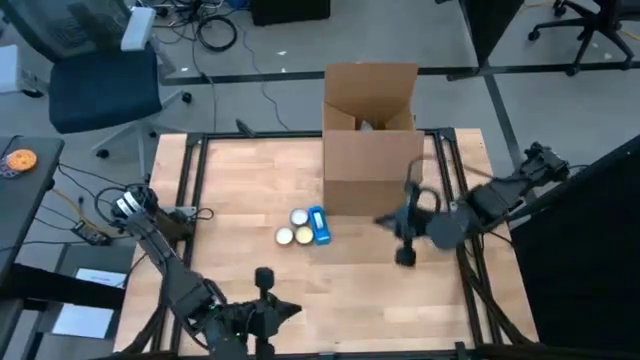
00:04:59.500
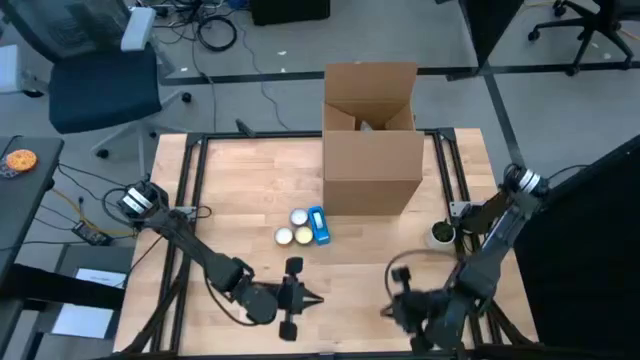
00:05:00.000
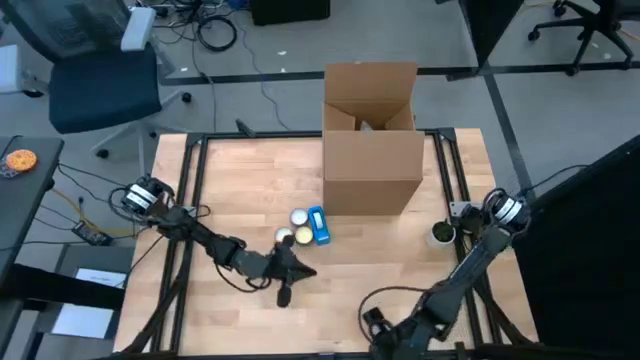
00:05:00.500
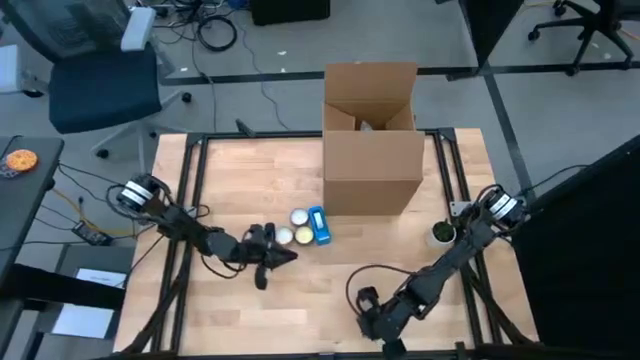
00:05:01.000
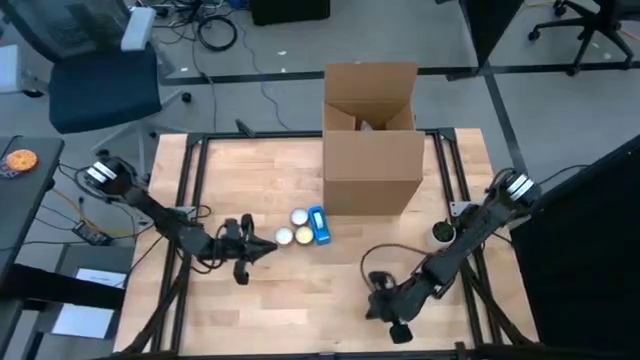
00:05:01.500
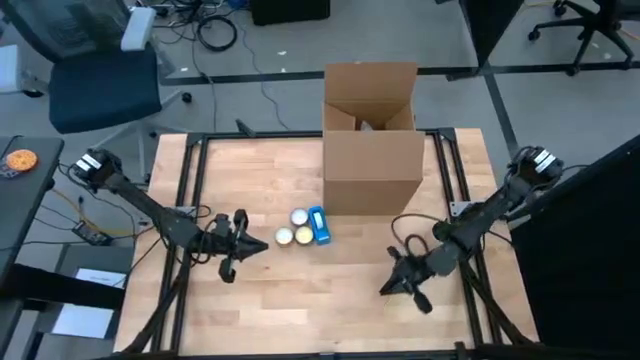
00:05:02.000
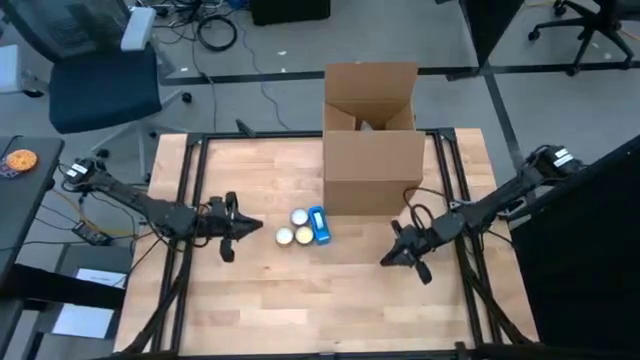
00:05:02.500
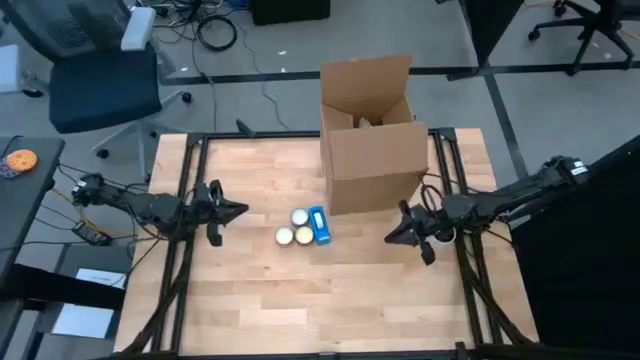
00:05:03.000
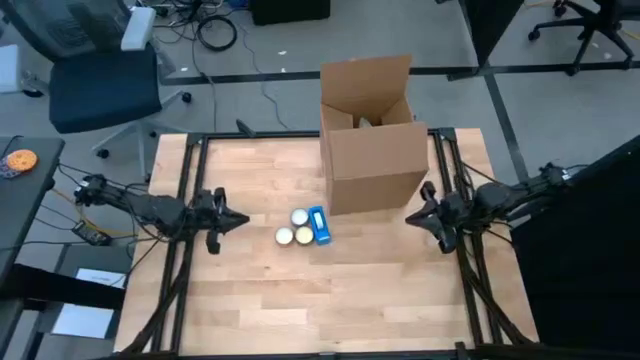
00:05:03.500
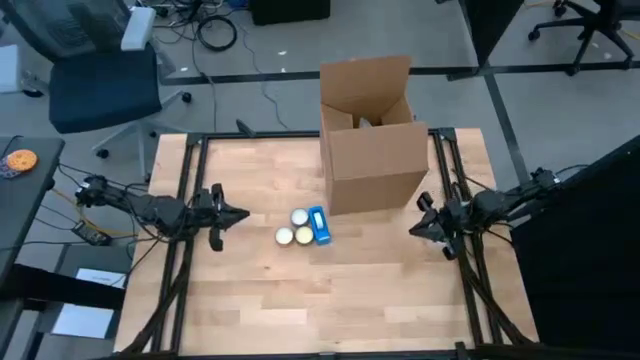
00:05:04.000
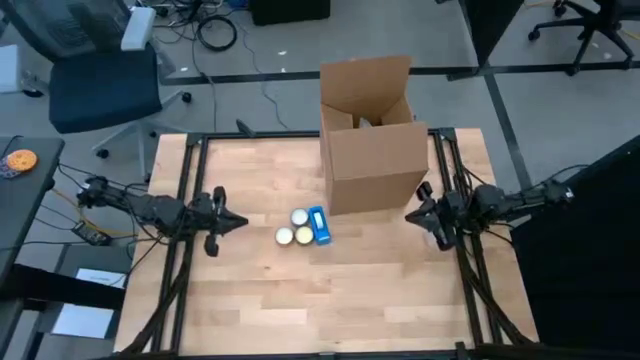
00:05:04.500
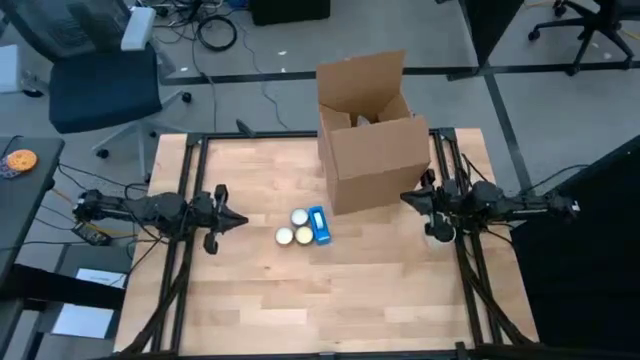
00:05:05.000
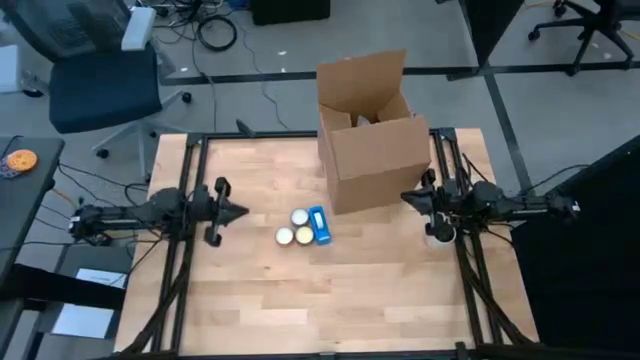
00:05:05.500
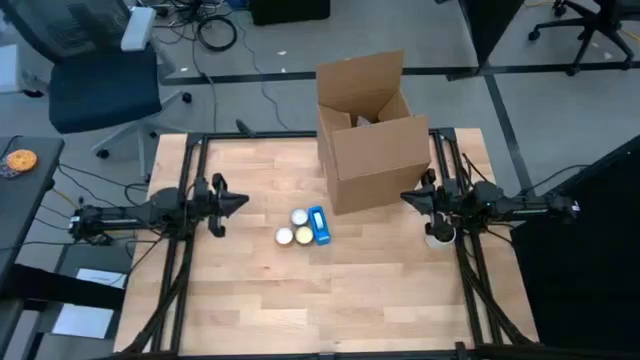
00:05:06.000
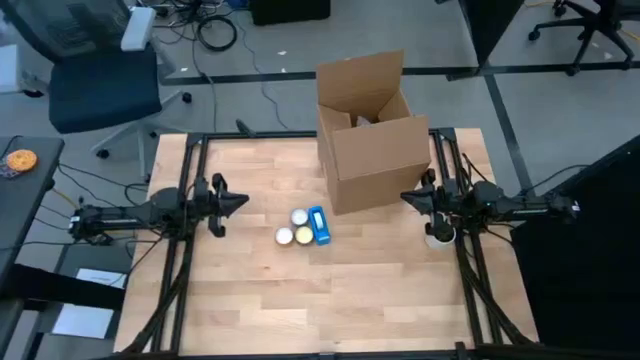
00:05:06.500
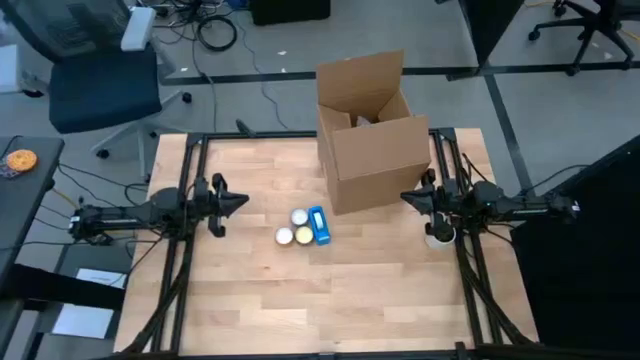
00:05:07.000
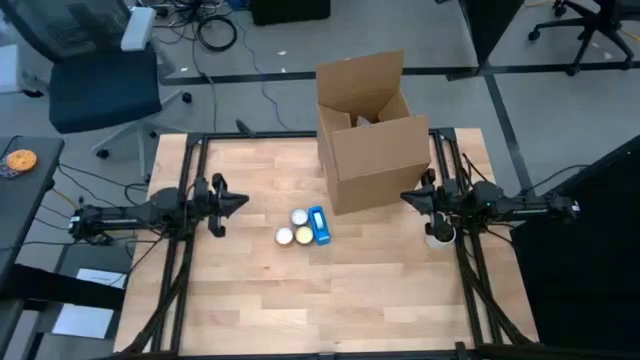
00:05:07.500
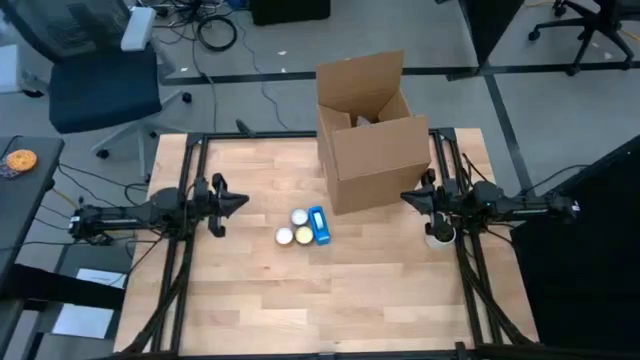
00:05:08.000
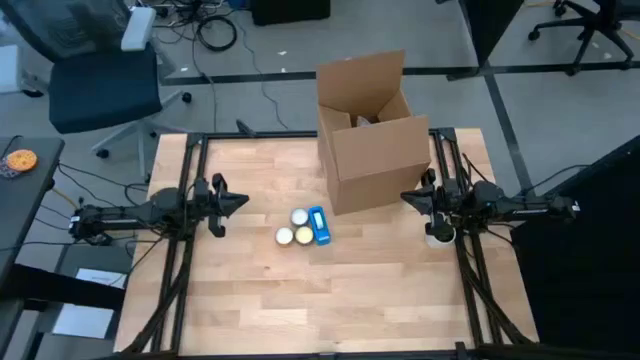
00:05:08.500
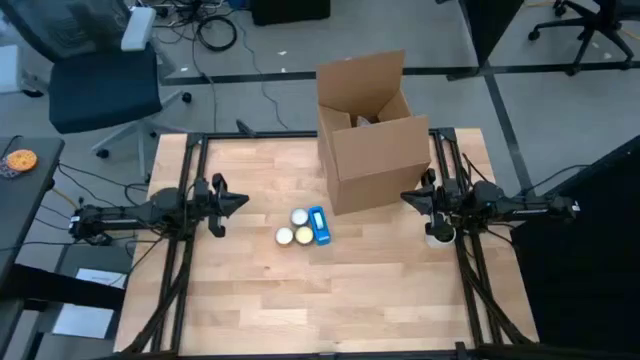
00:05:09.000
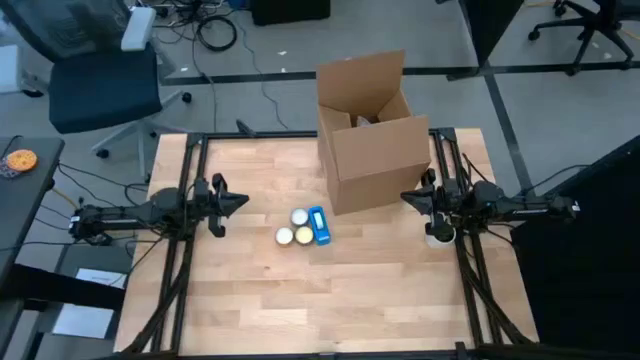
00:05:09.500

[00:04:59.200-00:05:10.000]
Task: wrap mug
Return to Home Position

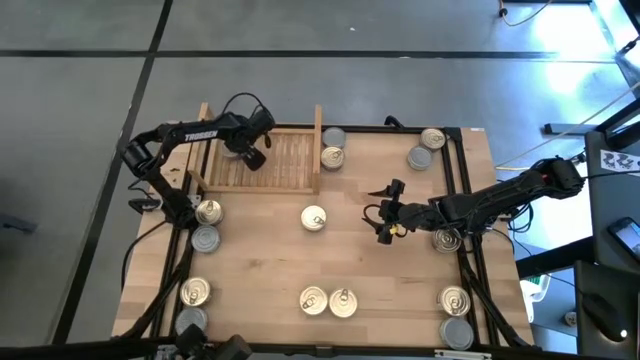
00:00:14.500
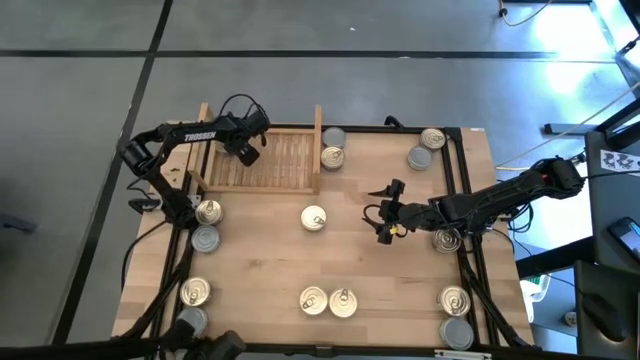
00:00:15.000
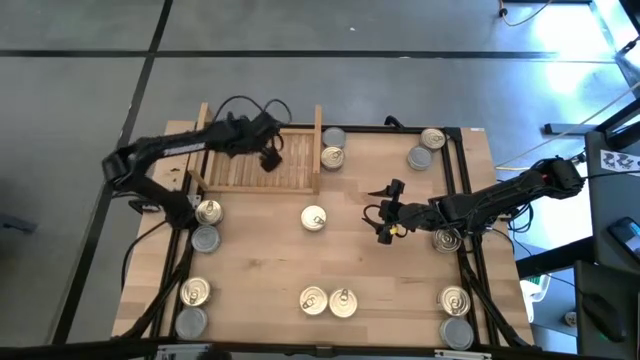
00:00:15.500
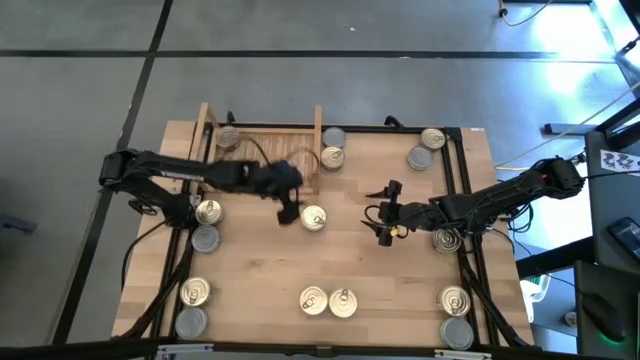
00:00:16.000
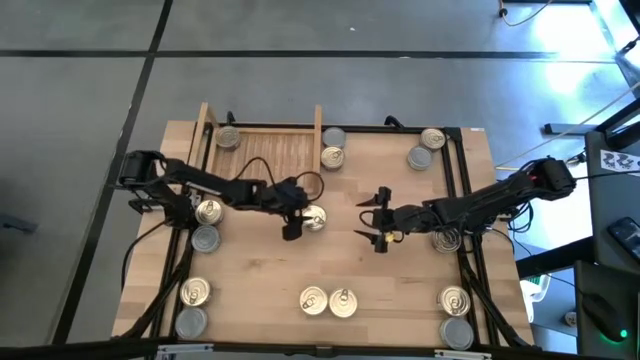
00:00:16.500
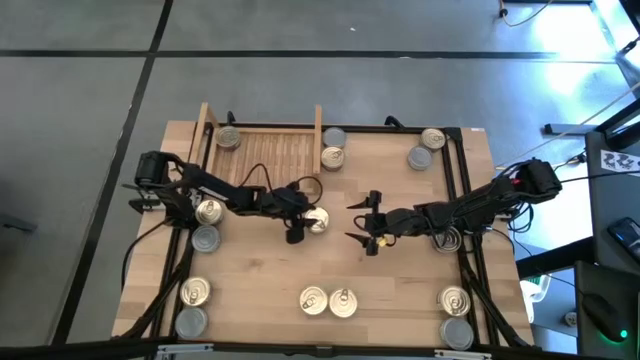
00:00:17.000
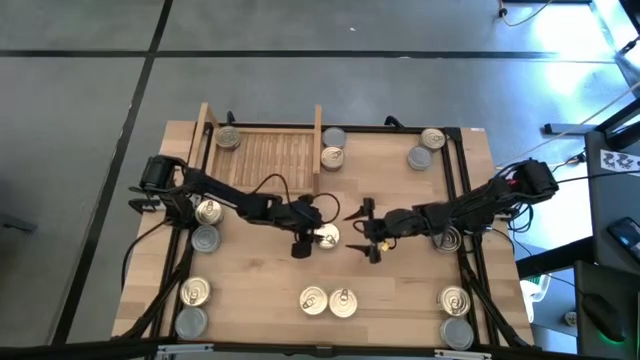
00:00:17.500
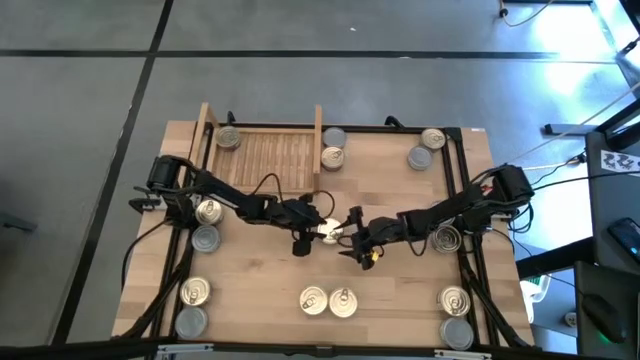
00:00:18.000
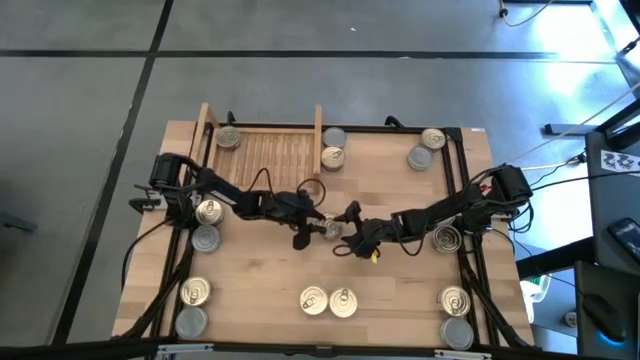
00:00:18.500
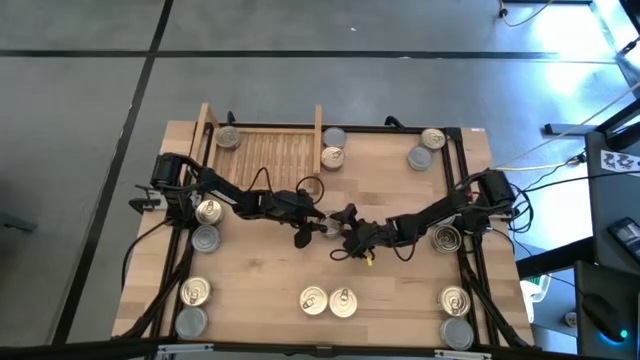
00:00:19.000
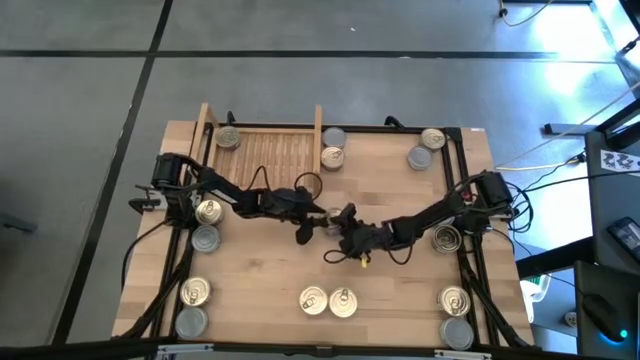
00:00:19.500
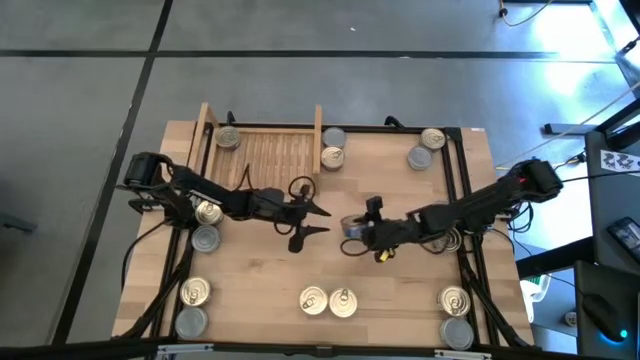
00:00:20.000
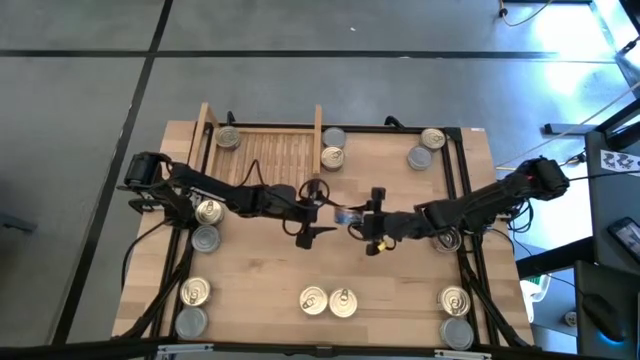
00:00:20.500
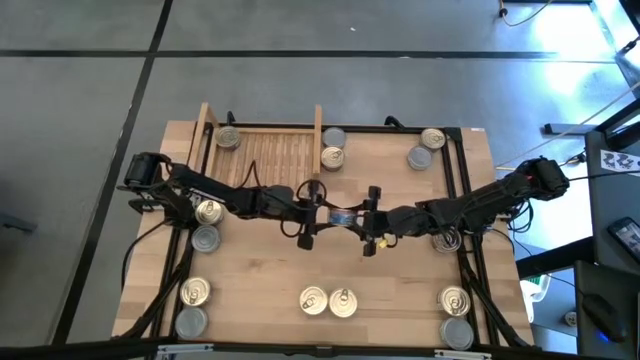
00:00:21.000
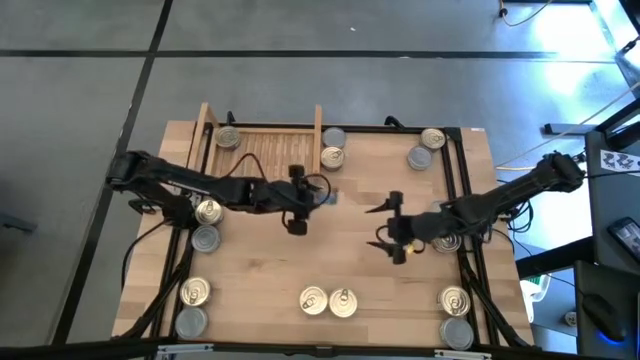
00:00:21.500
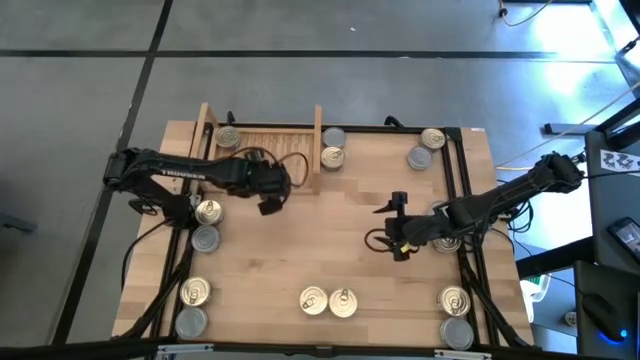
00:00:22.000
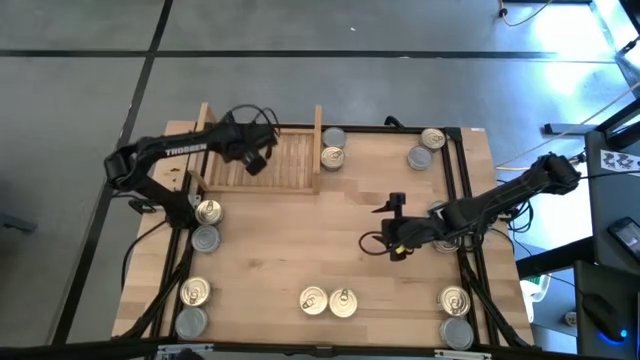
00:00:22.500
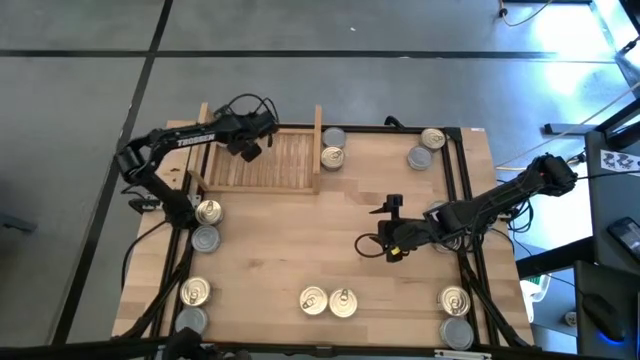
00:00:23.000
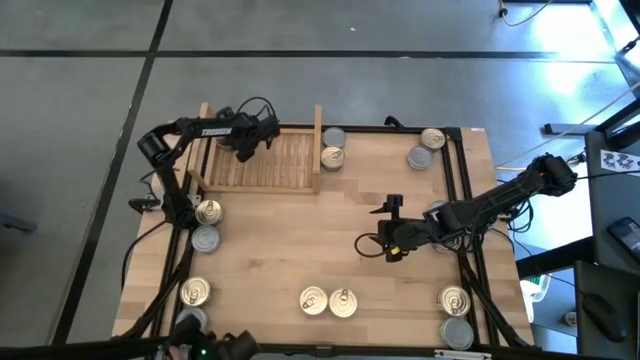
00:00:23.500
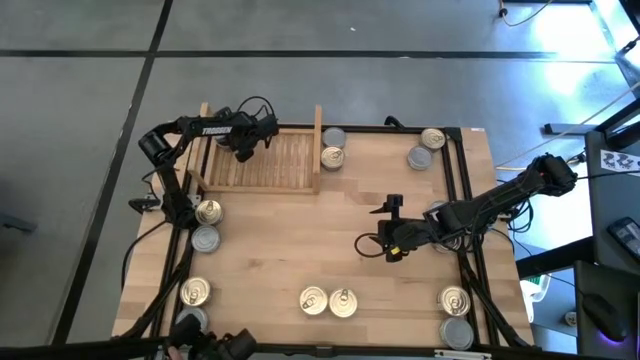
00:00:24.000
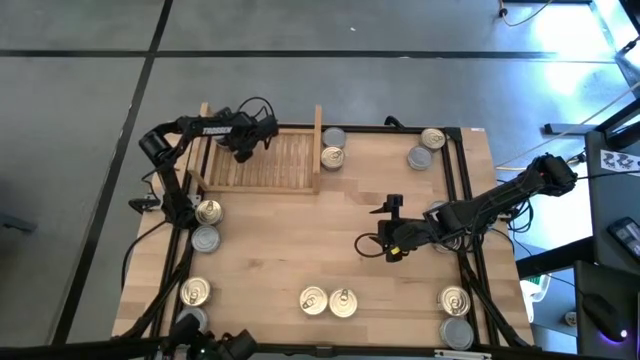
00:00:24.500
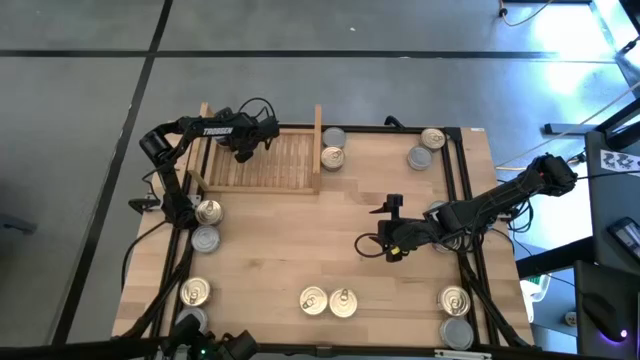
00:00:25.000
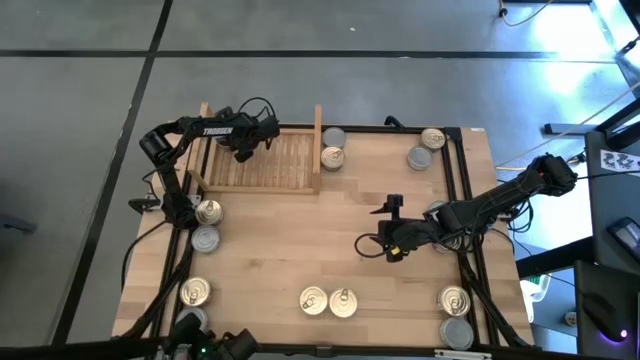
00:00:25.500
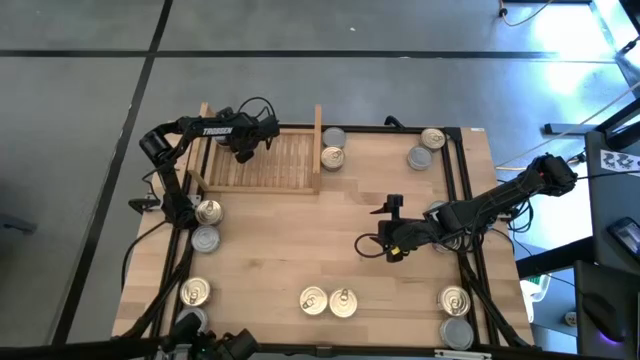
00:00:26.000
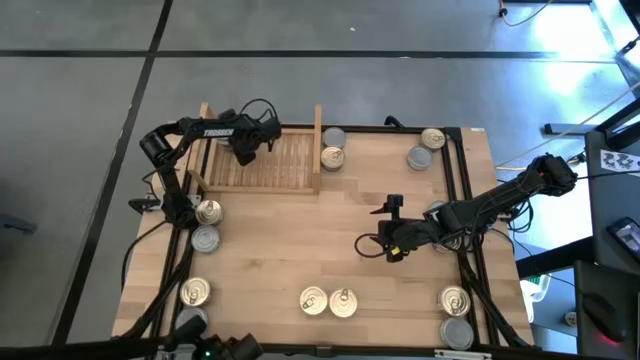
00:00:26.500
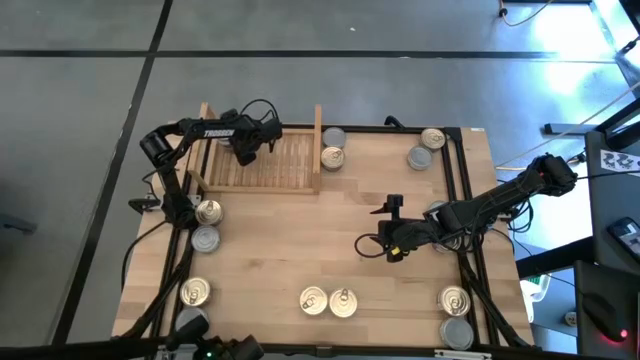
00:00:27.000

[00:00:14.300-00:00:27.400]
Task: Stack canned seafood by type on shelf
Stack the blue tuna can on top of the other blue tuna can on the shelf
